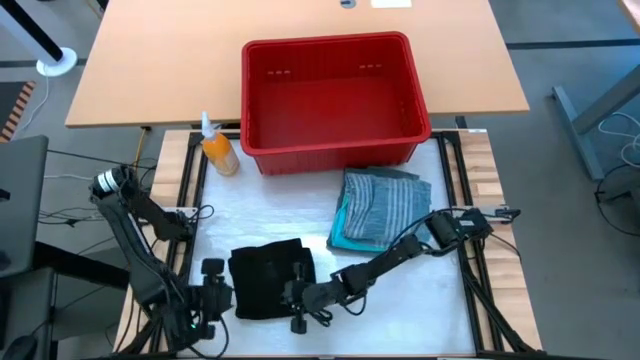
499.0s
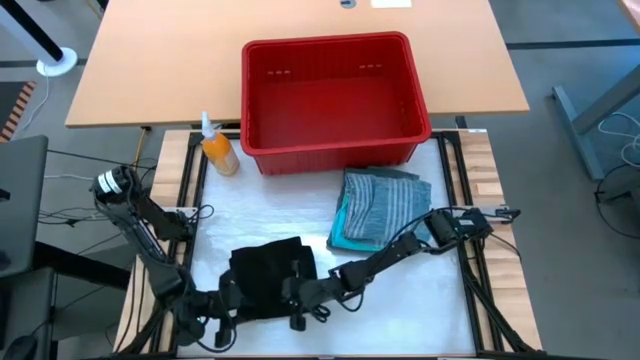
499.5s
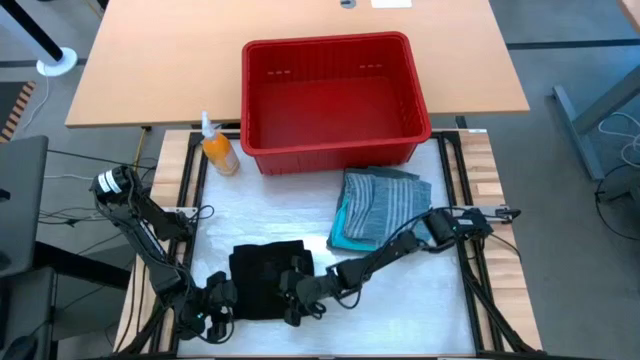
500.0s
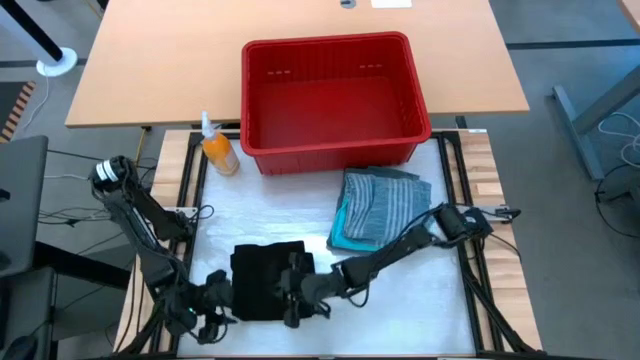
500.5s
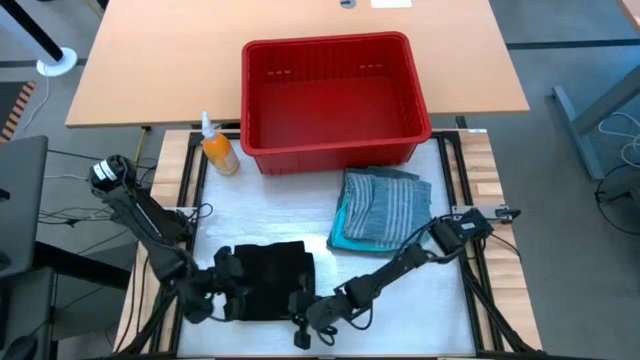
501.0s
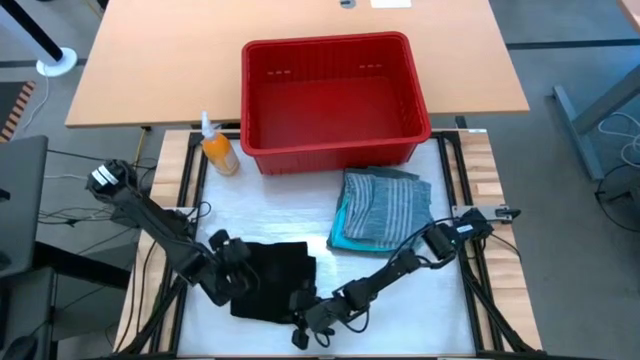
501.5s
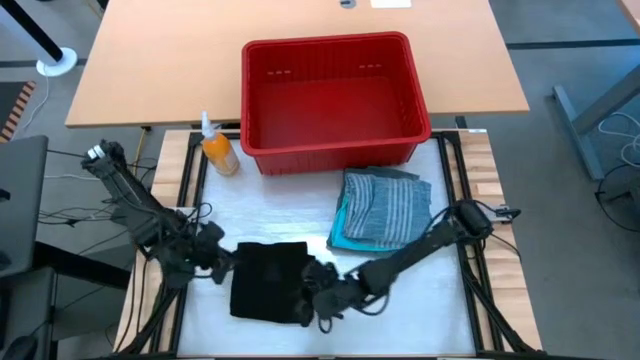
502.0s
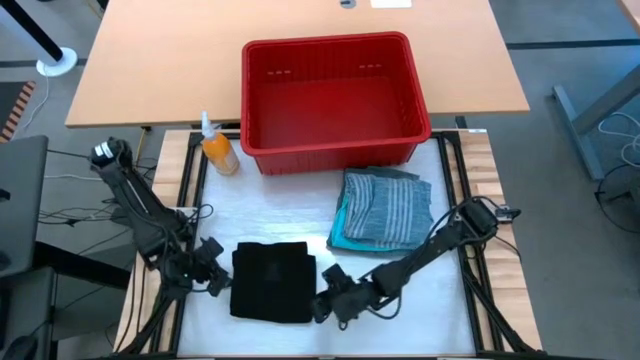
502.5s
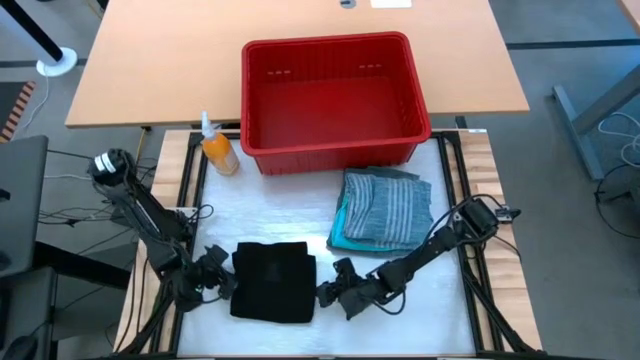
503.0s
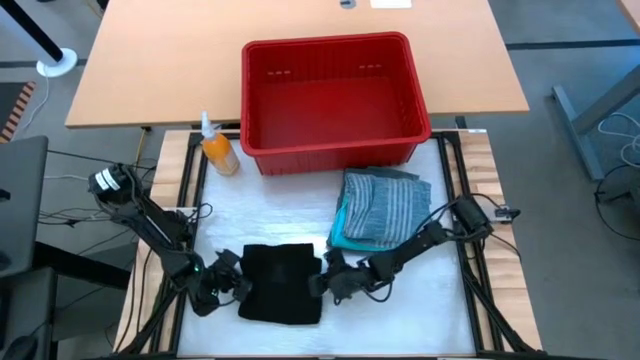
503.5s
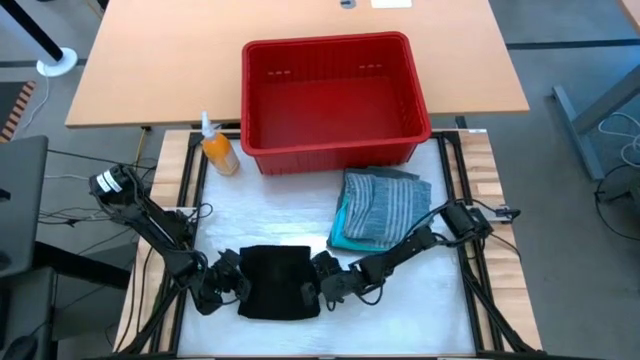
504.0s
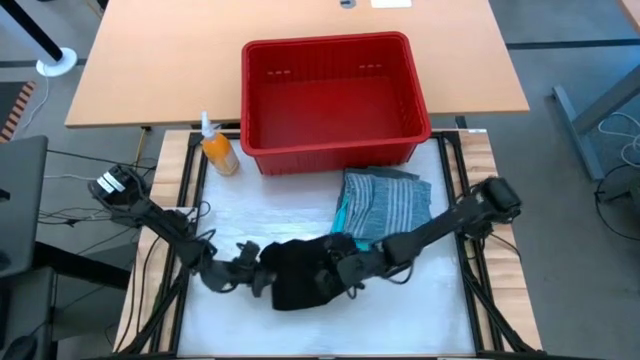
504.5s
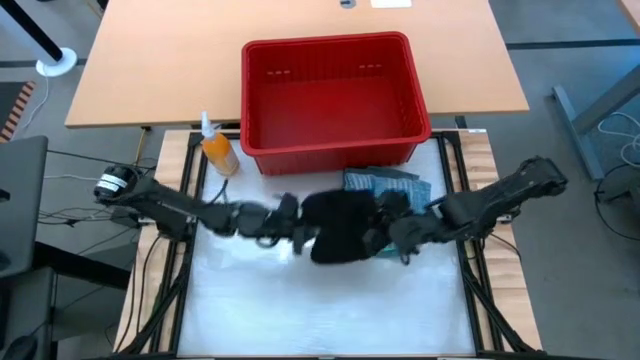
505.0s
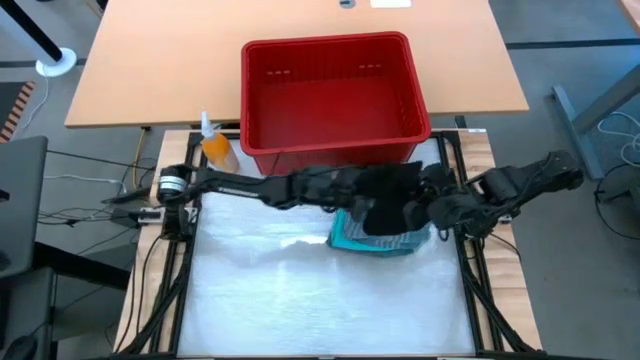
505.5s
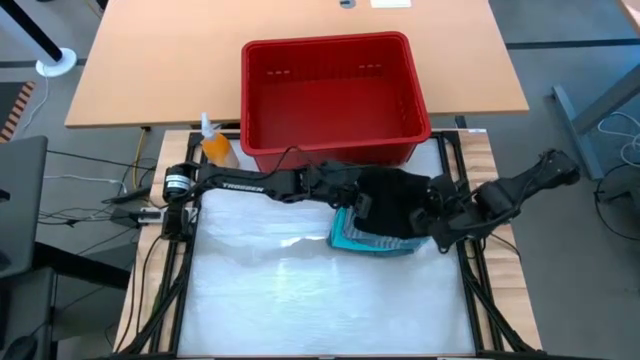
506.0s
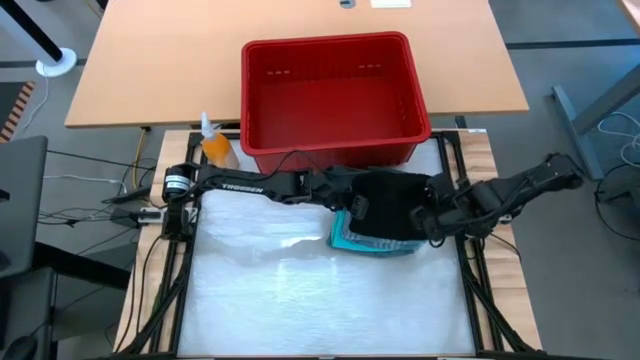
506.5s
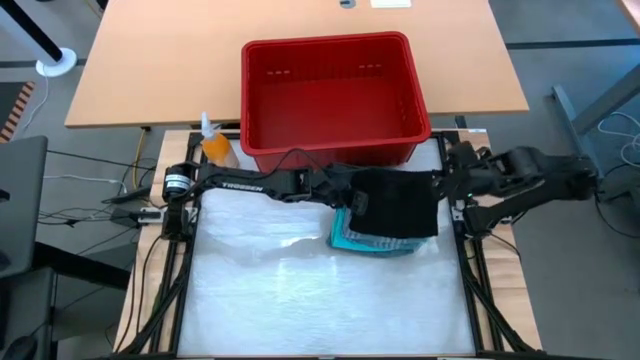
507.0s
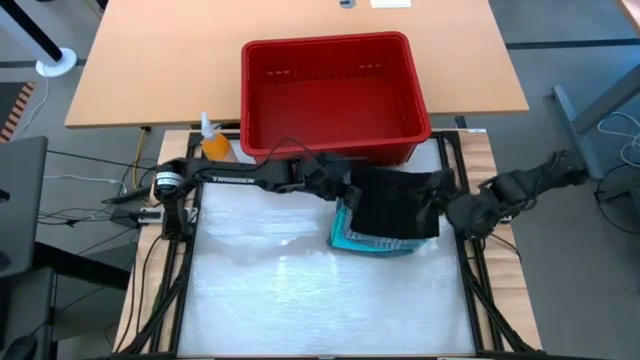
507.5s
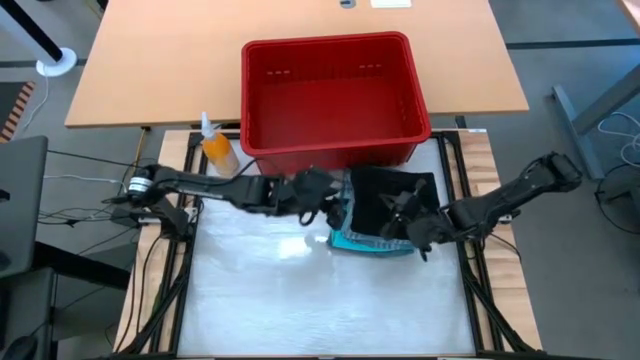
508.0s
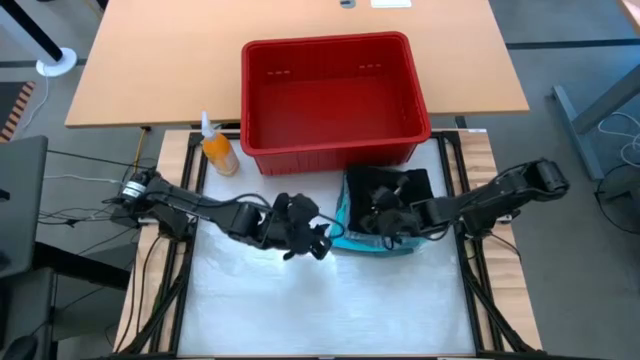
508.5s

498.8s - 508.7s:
Task: Fold Laundry from Bin
Stack the folded black shirt on the folded blue patterned polo shirt

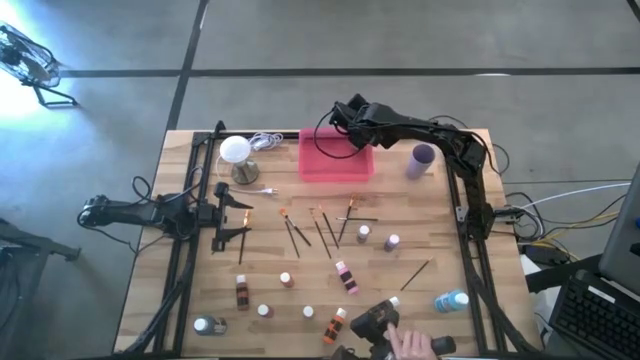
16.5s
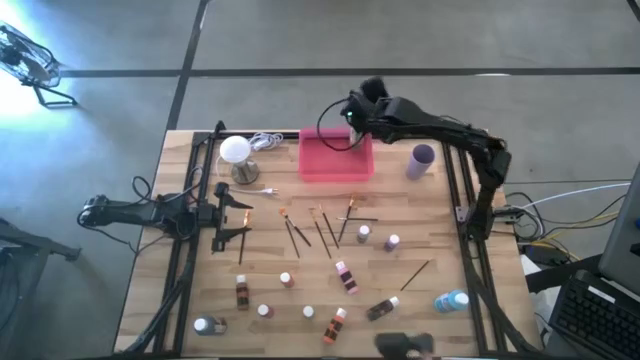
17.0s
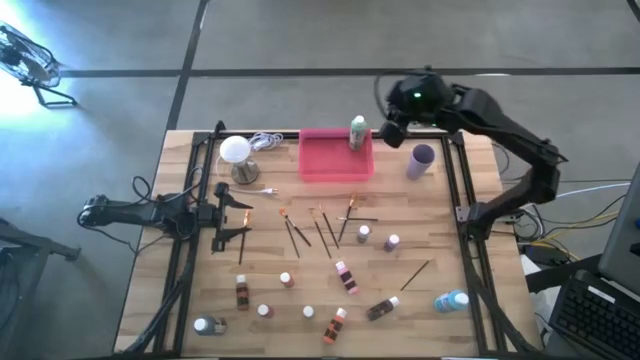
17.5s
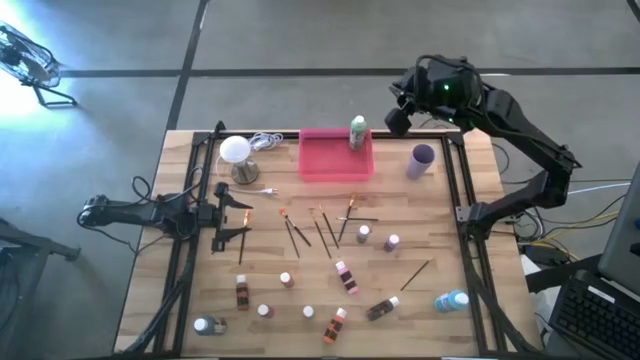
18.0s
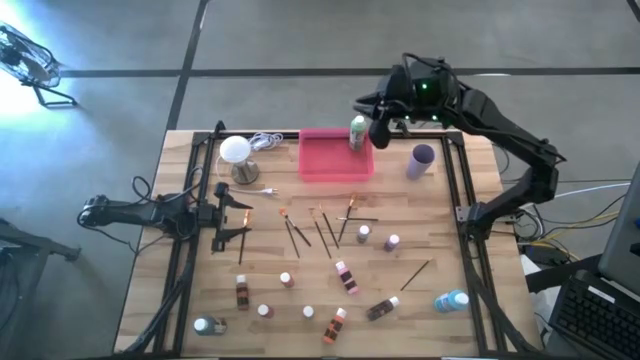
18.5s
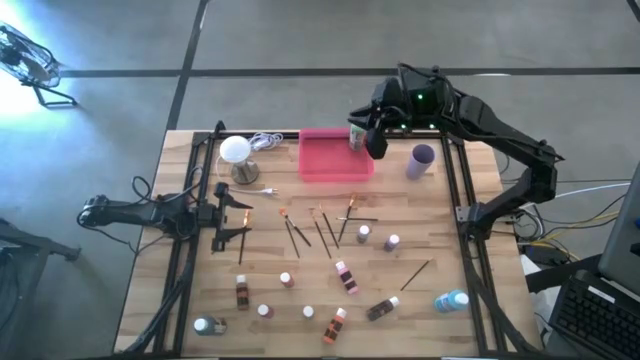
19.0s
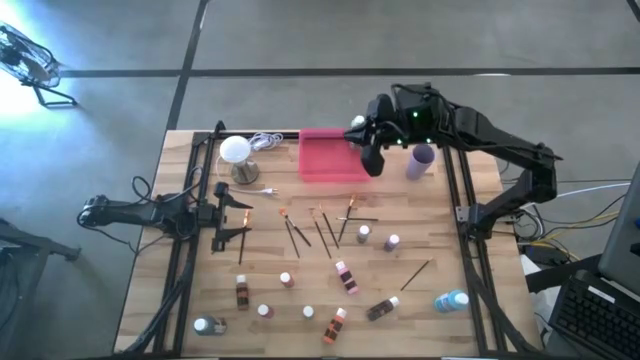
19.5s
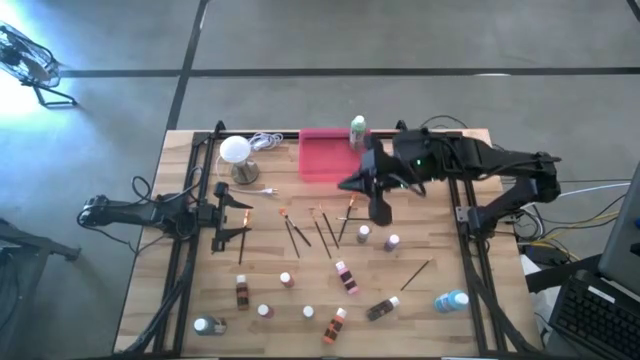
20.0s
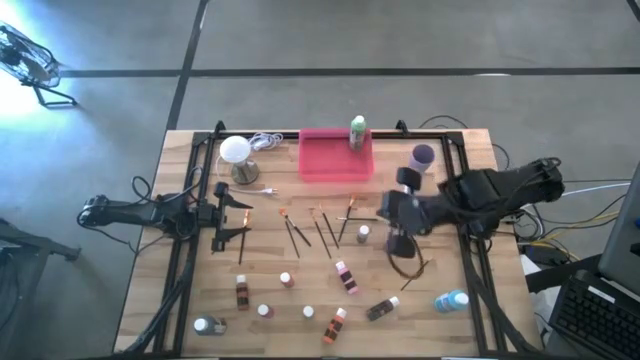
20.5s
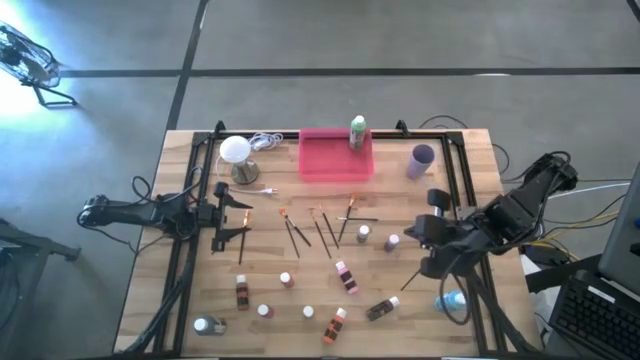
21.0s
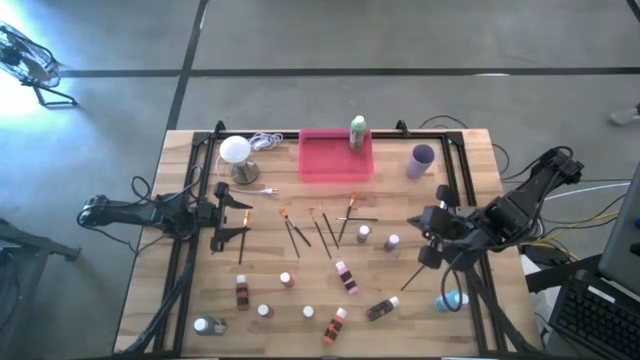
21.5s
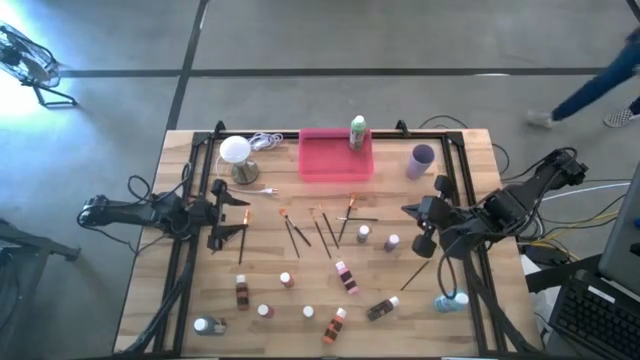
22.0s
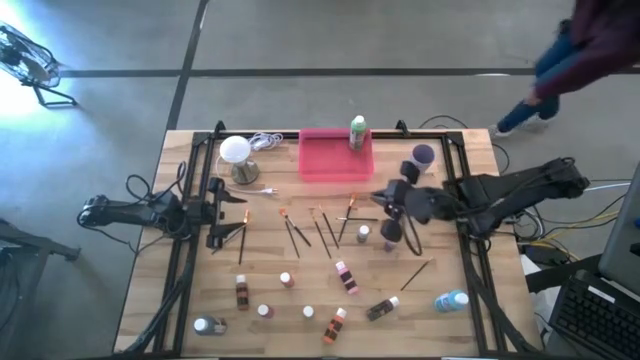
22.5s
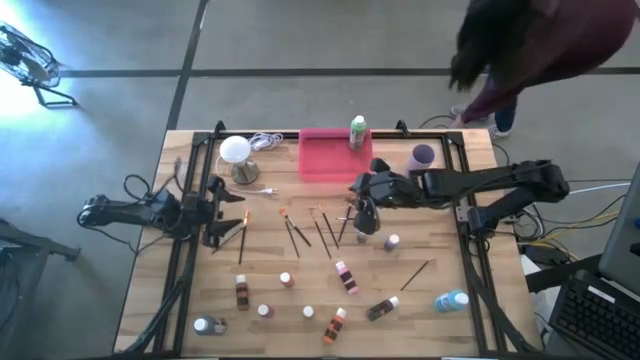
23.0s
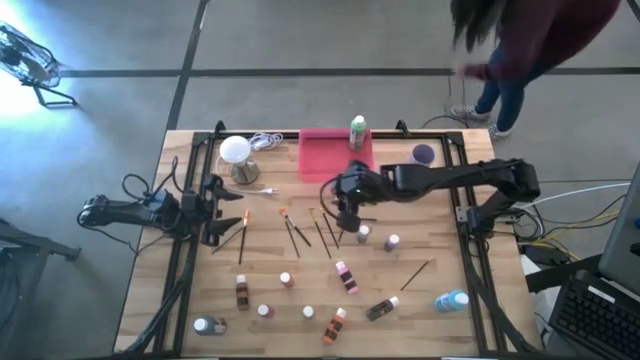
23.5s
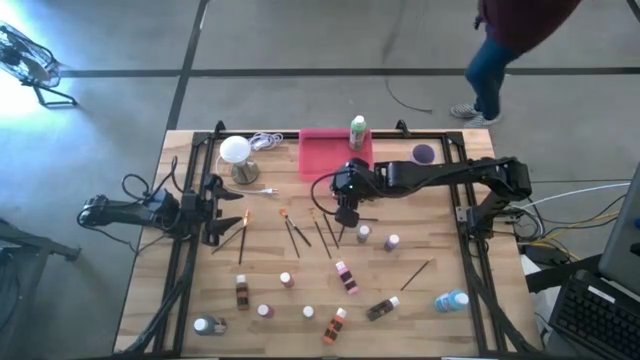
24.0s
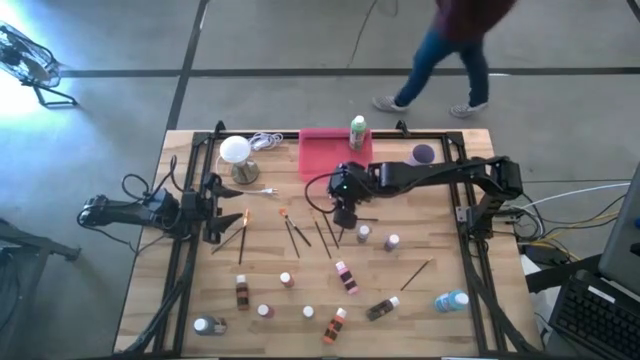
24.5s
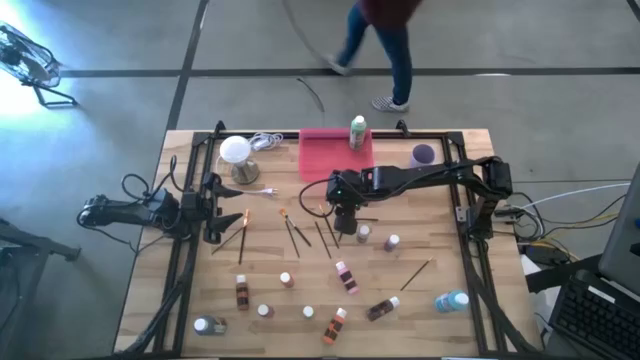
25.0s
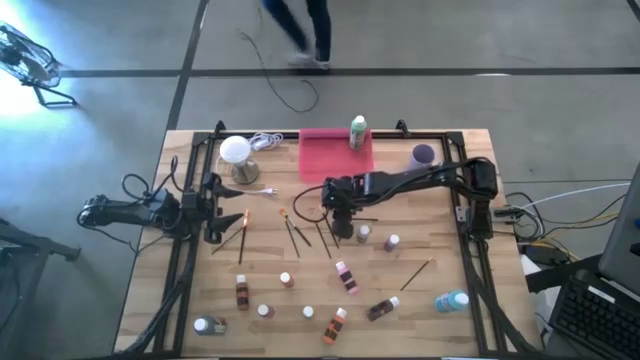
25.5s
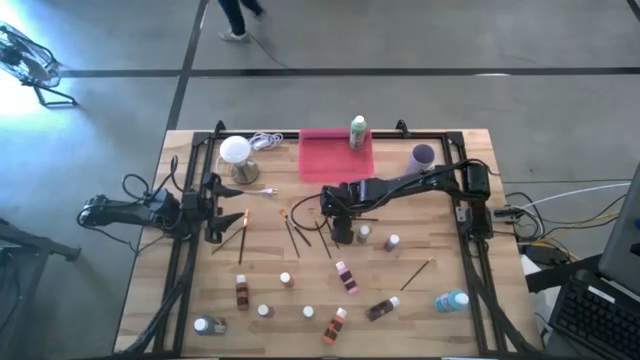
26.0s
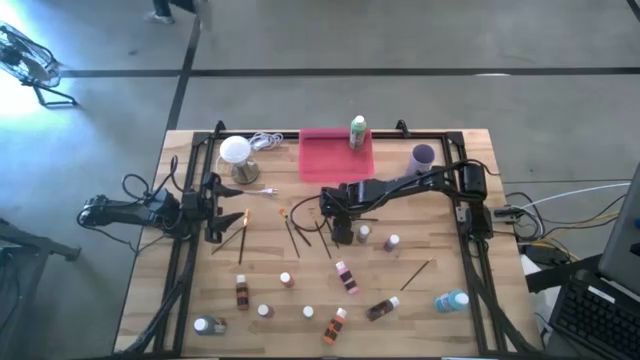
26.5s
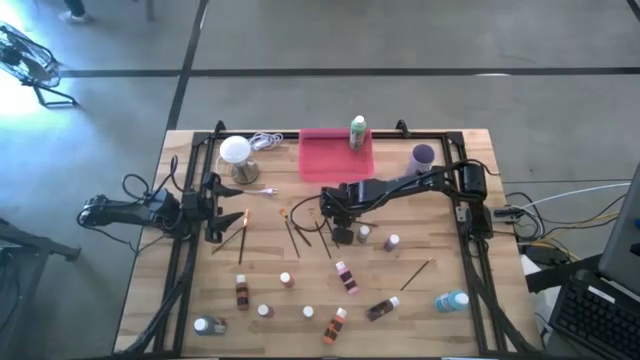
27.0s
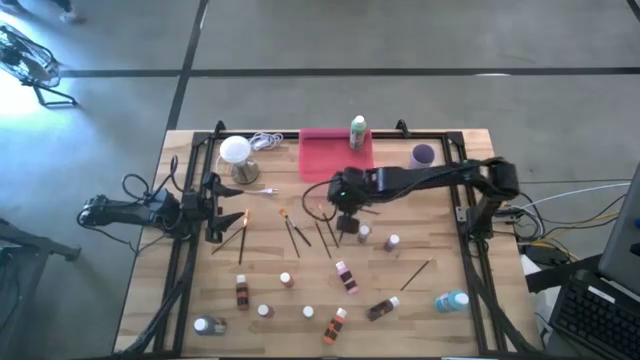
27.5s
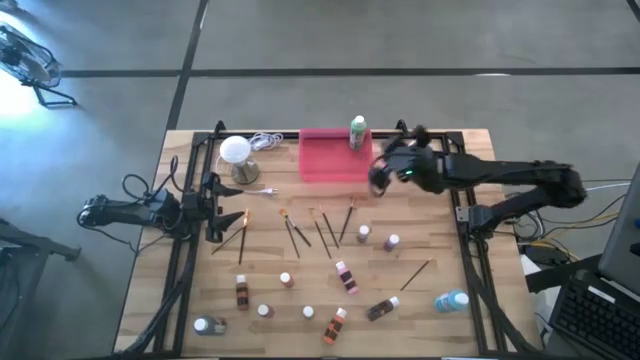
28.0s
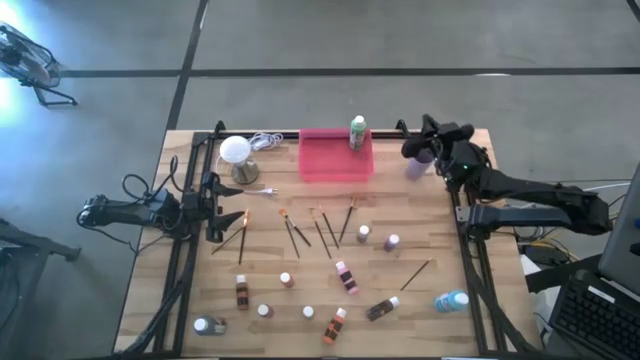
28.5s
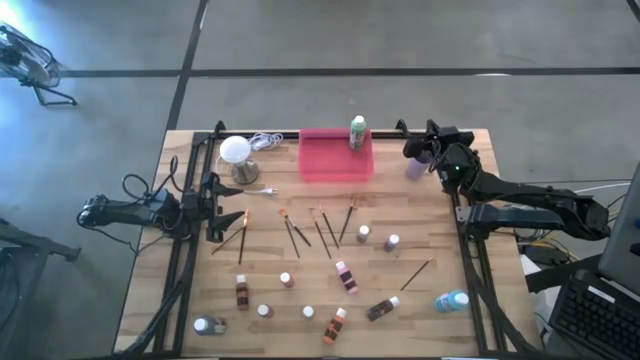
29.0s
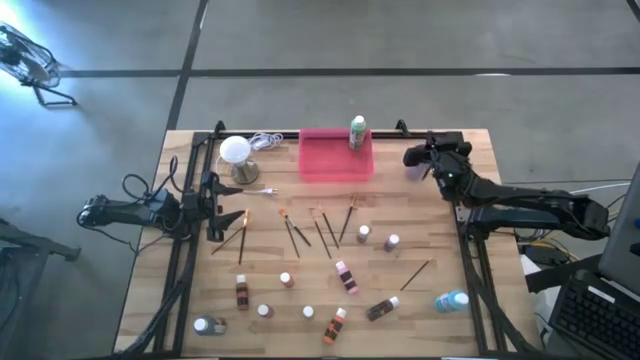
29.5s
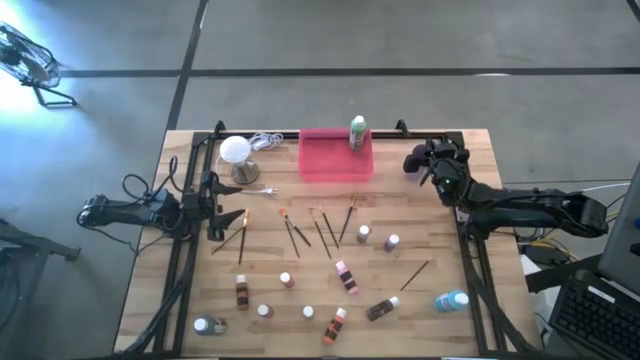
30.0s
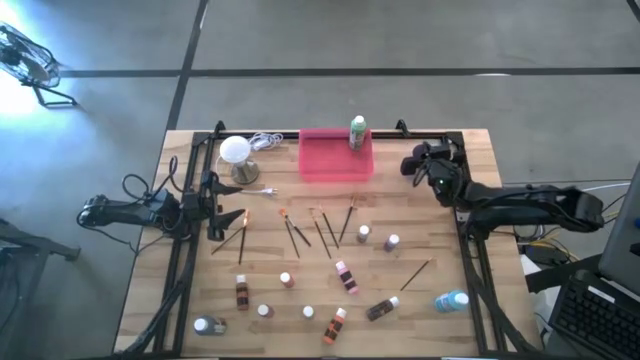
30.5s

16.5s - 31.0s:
Task: Pick & Place Paint Supplies
Put the black silver paint brush into the violet cup
